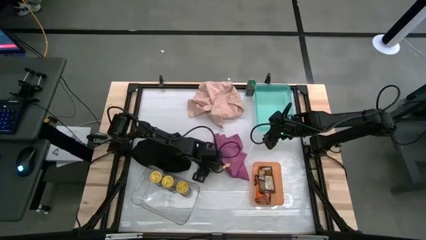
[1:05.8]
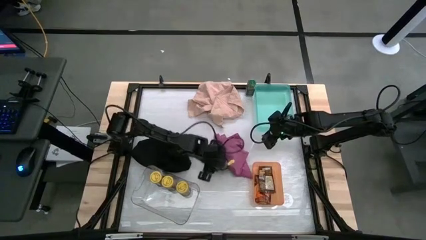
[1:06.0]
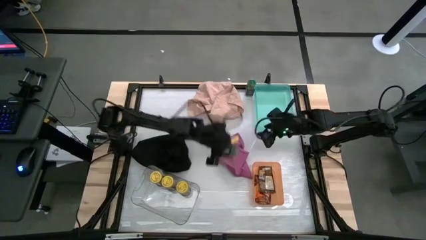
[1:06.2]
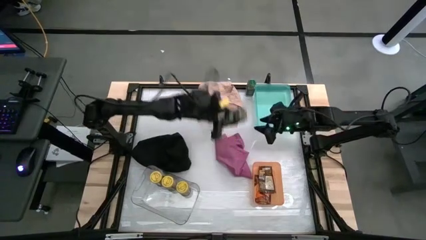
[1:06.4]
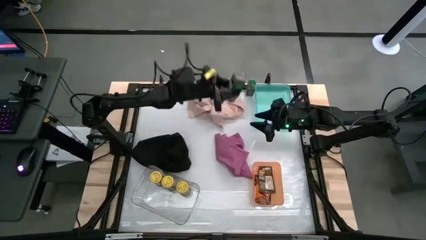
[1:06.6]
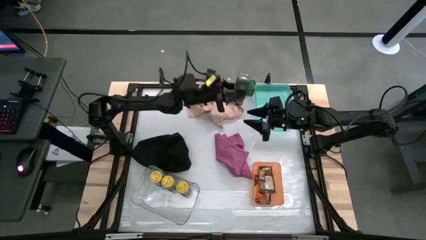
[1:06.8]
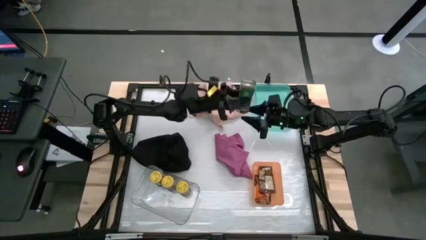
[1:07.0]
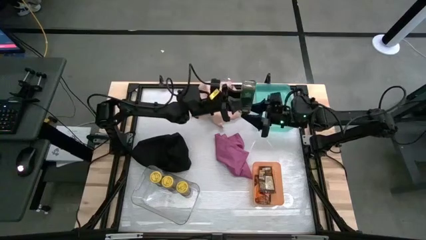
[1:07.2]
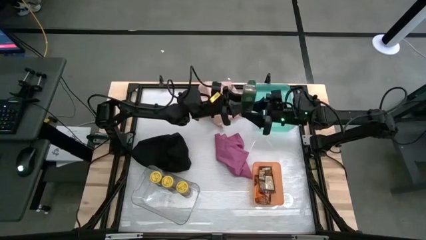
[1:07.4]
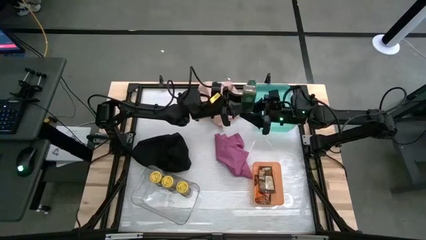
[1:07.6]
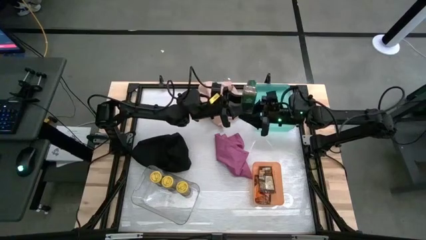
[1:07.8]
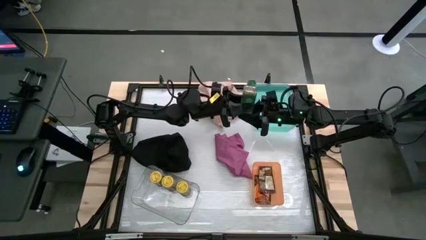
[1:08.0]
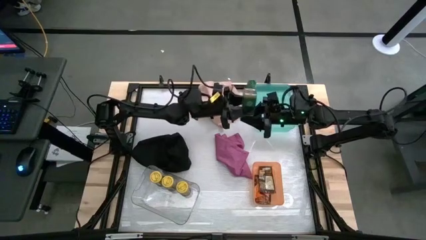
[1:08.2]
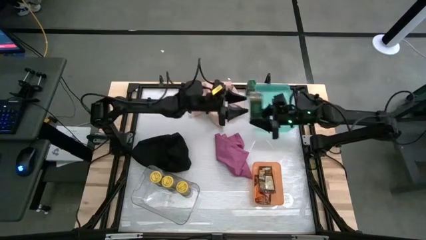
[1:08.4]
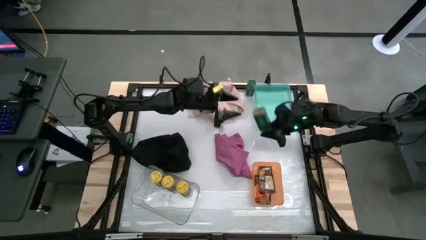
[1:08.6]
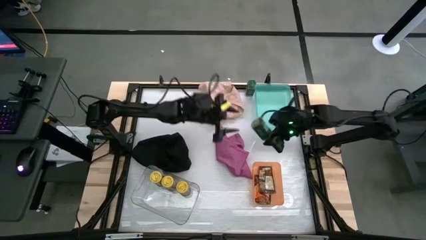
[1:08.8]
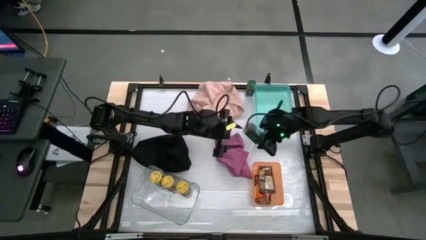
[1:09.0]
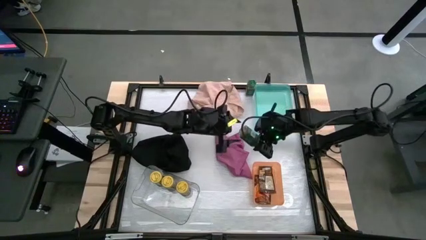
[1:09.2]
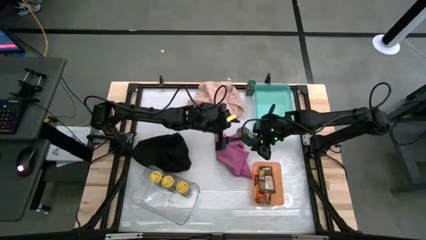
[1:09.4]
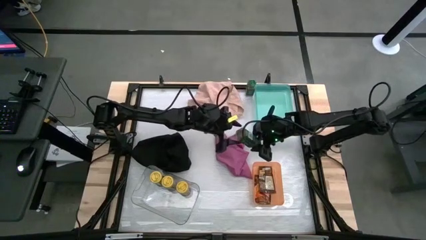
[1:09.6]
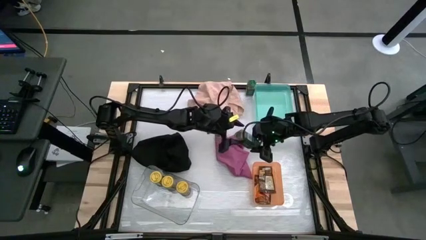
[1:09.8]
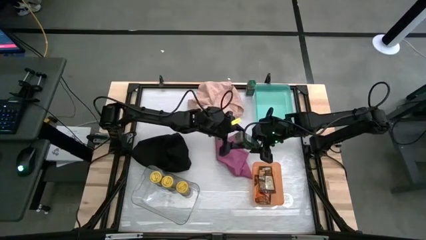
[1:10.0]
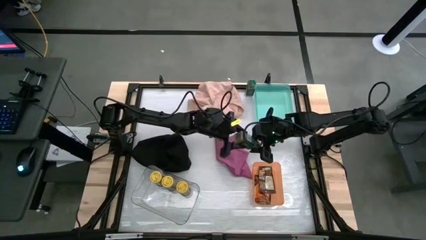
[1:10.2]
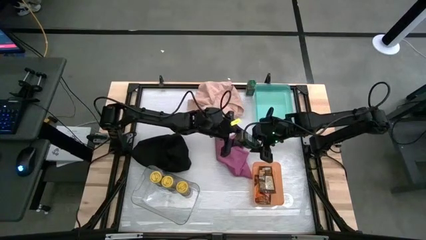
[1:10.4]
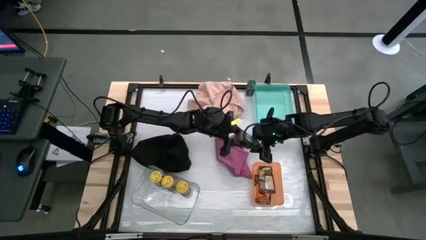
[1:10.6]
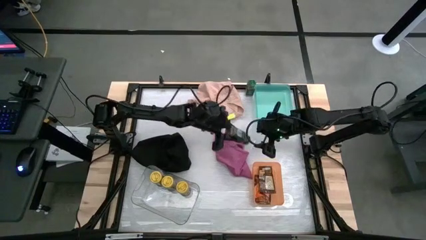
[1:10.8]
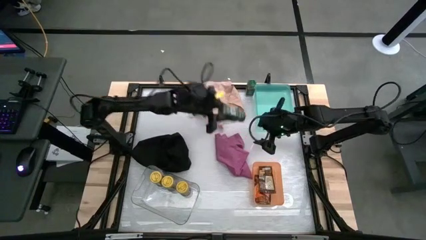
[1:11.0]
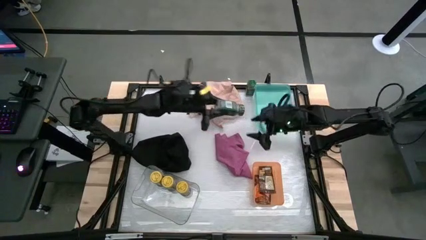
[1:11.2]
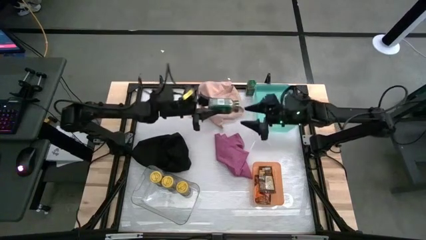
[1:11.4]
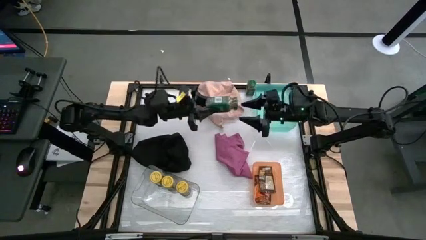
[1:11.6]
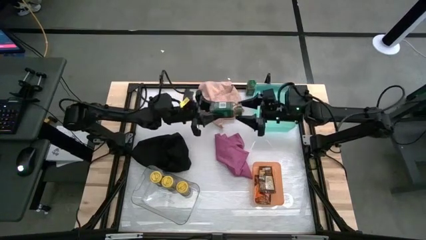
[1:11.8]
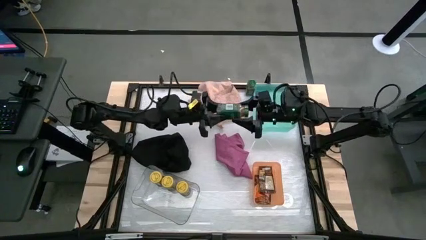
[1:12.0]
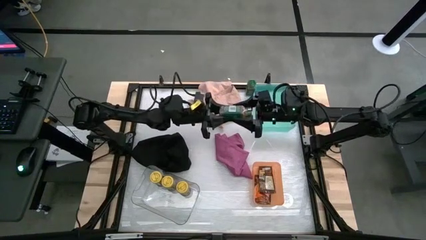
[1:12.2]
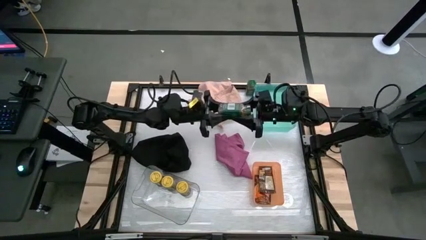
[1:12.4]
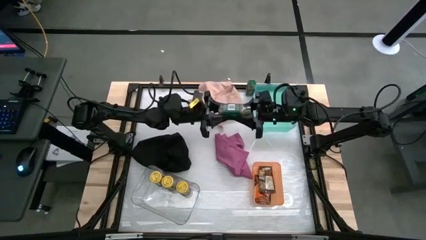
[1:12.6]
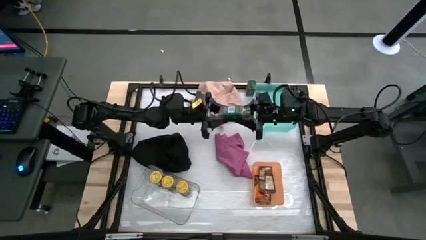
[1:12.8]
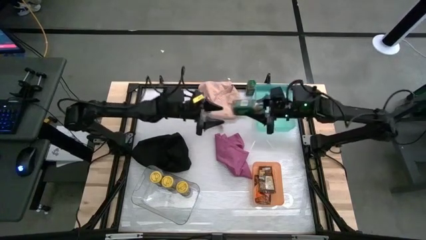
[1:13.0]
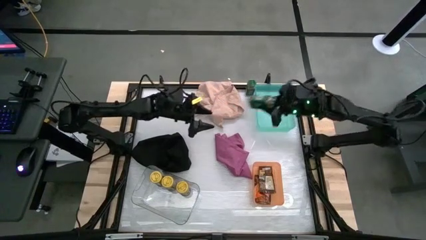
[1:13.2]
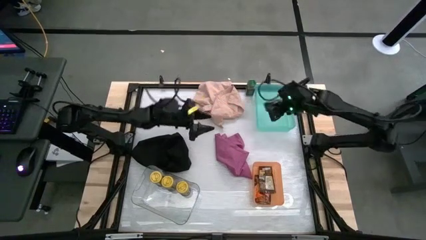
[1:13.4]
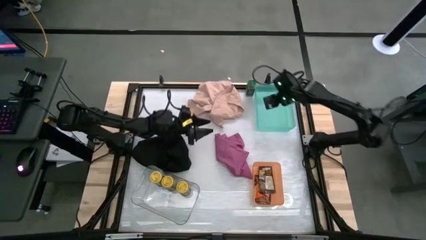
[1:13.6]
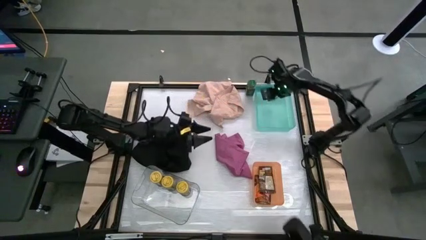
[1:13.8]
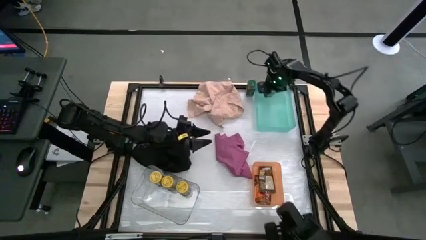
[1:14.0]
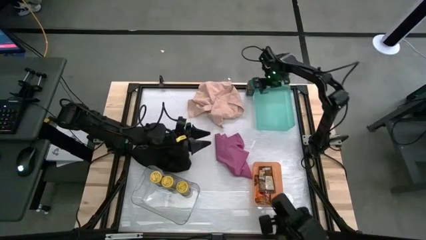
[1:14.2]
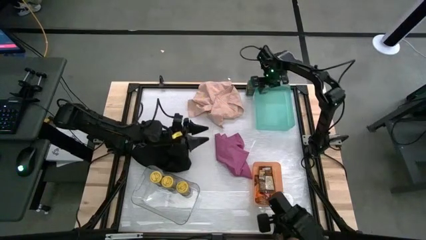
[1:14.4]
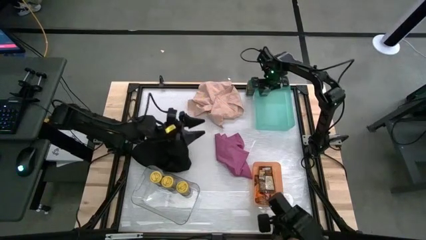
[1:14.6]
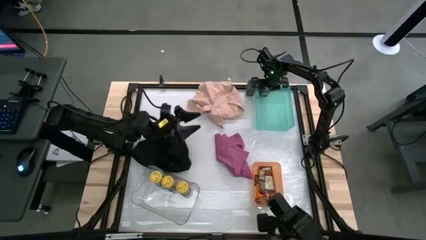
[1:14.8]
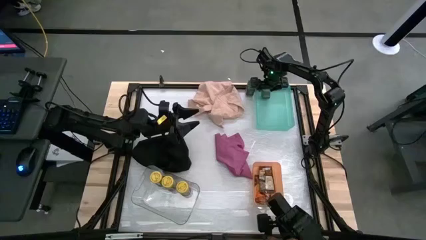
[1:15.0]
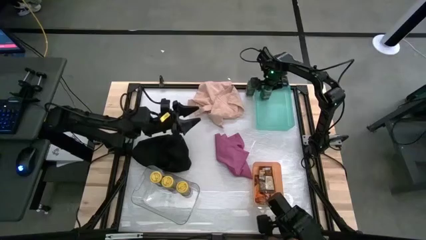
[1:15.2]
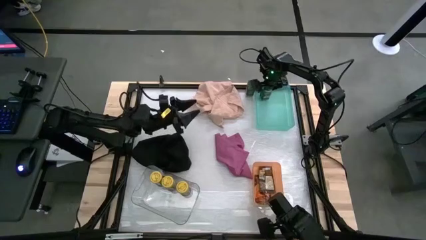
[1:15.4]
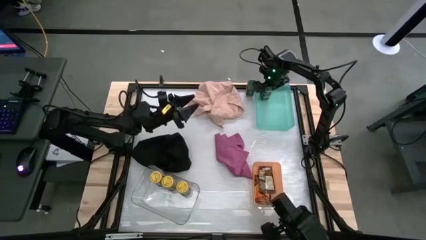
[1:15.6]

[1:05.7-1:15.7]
Task: Sort spices by type
Put the bottom green seasoning bottle into the green bin

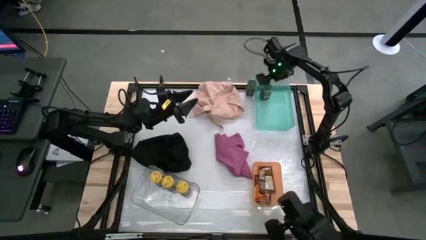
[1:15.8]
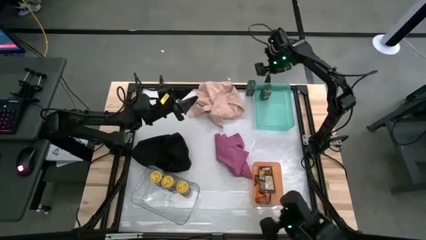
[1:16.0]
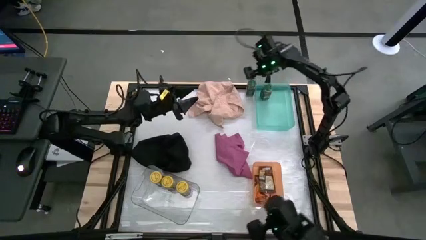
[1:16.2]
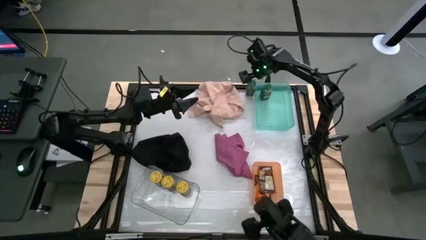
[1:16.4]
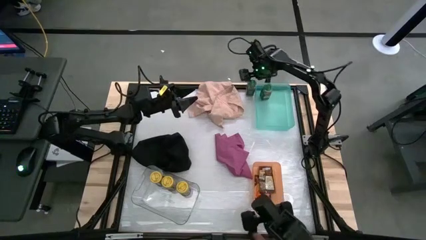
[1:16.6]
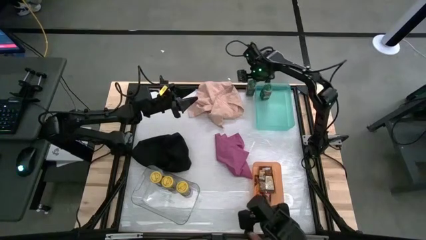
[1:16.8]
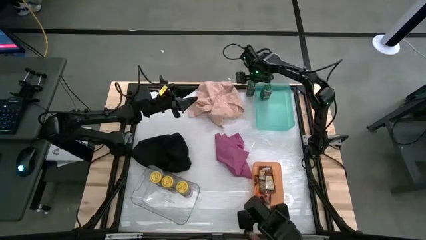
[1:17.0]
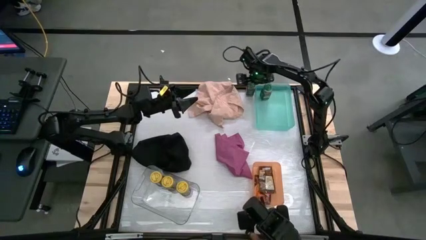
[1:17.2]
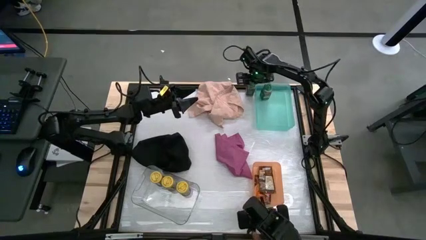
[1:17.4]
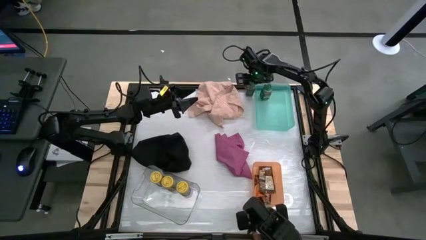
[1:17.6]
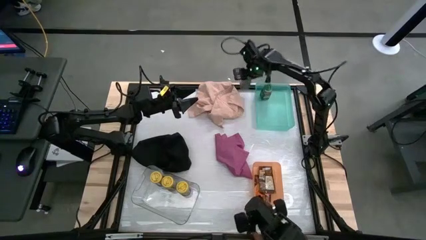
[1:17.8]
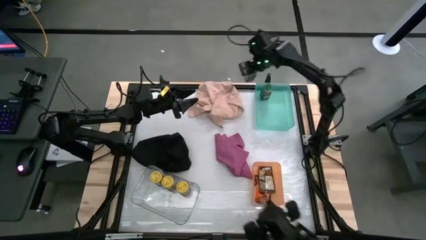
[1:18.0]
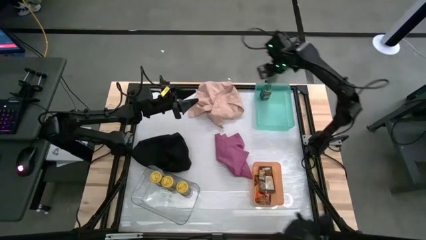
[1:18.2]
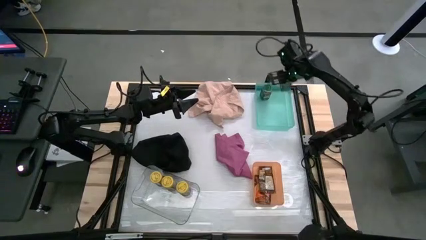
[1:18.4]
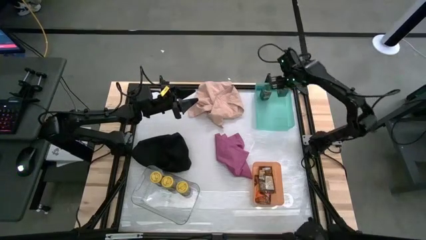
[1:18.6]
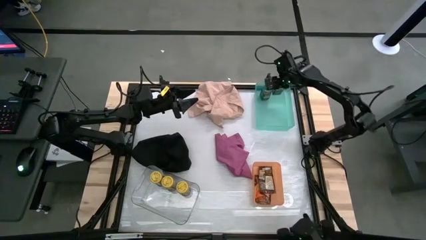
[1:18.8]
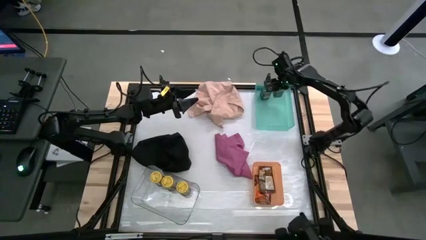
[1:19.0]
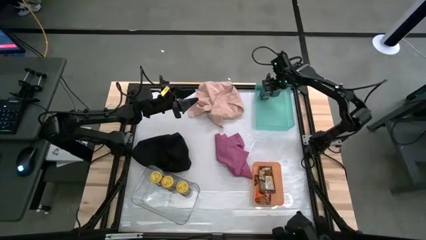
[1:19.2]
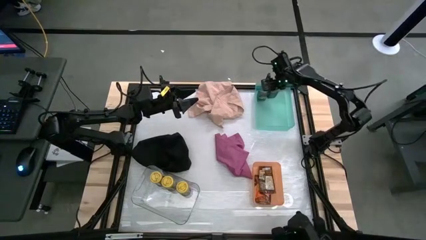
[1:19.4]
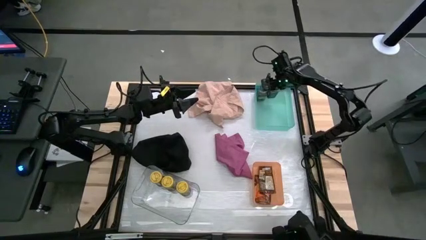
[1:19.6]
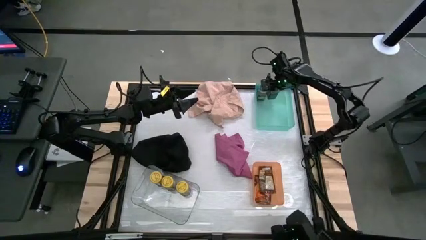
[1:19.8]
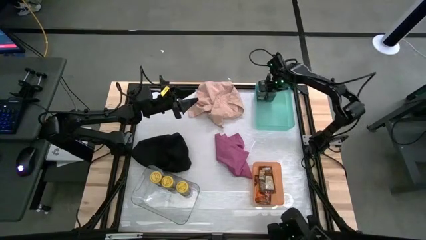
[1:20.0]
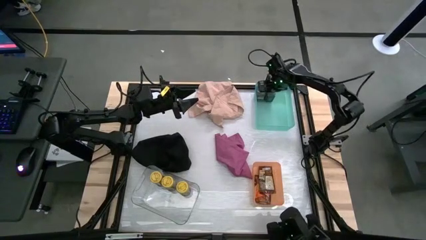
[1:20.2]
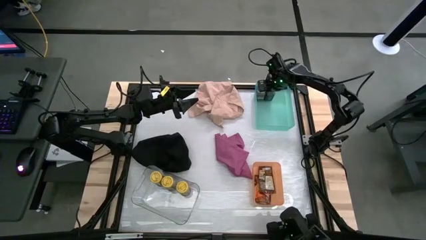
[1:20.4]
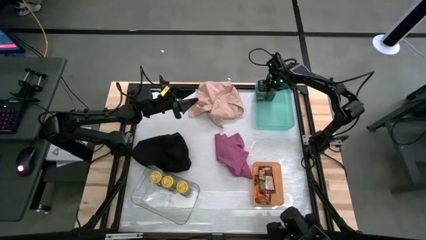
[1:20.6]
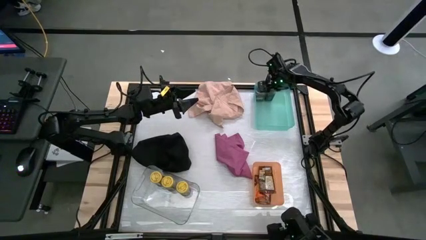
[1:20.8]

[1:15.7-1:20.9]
Put the green seasoning bottle into the green bin

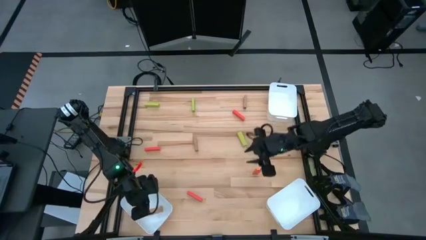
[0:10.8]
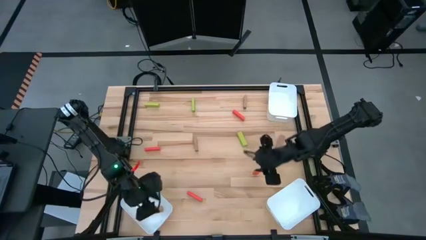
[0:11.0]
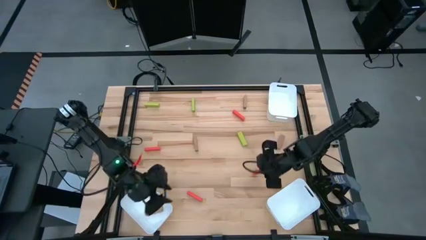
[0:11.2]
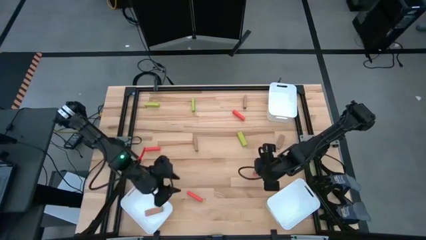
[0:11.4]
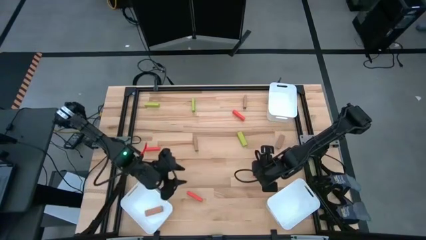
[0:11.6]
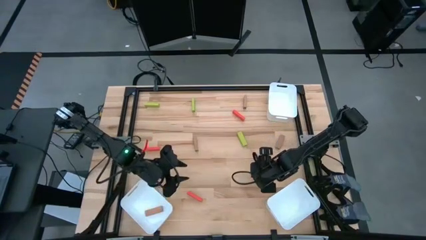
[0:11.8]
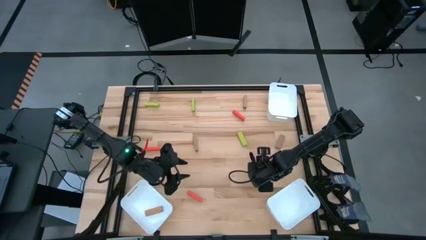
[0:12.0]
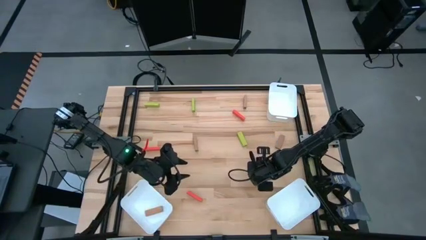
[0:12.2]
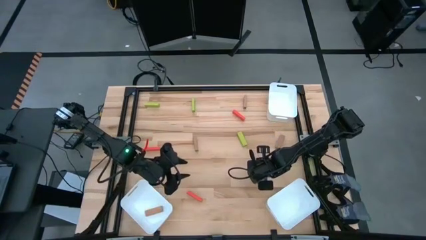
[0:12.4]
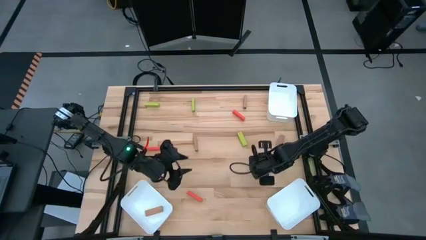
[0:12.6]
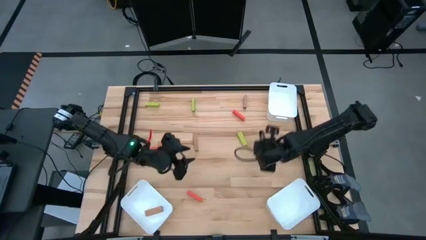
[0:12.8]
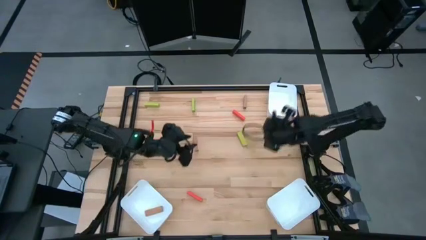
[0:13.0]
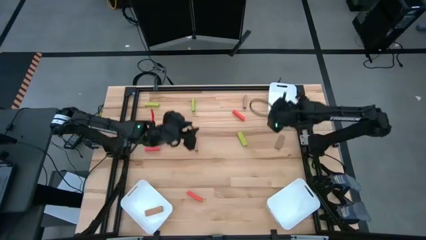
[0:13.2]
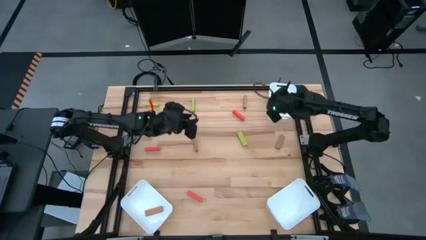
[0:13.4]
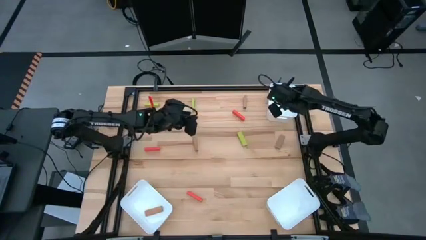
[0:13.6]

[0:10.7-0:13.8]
Task: Sort blocks
Put the orange block into the top right bin
